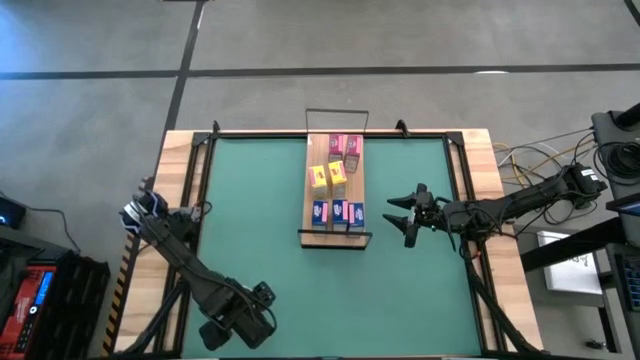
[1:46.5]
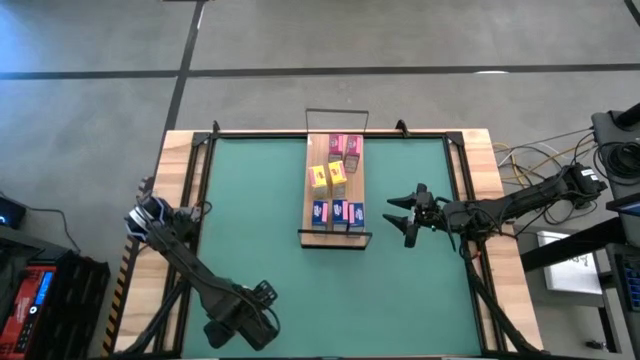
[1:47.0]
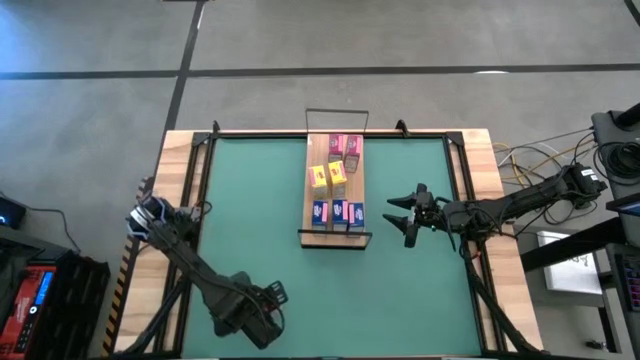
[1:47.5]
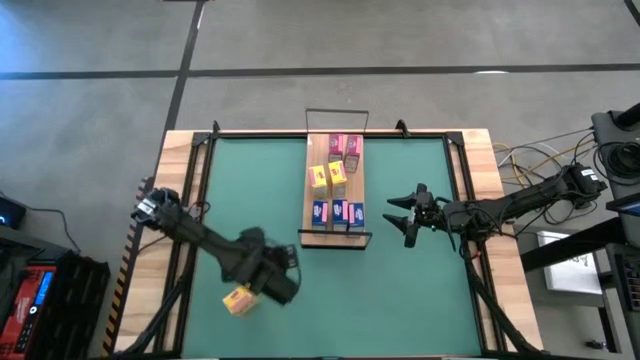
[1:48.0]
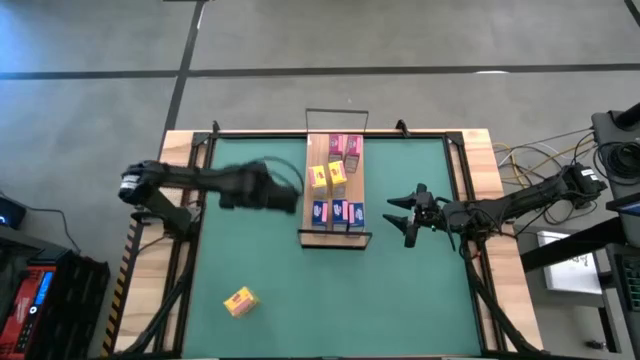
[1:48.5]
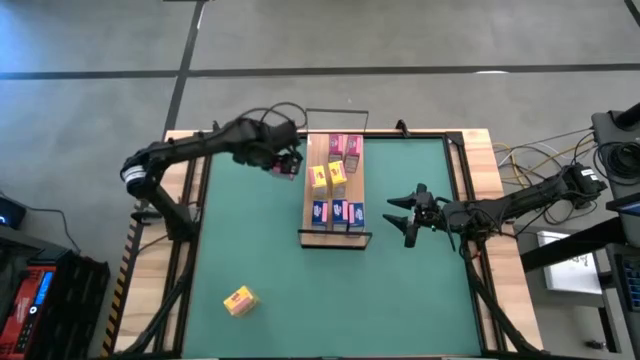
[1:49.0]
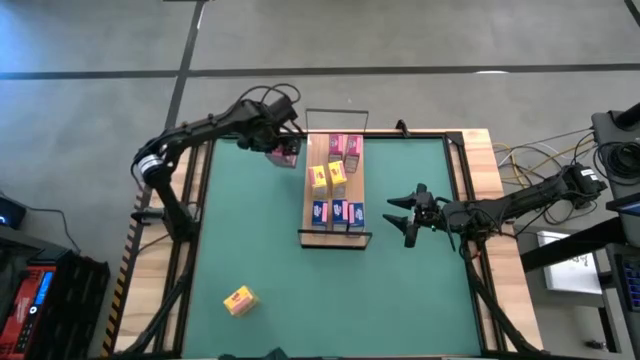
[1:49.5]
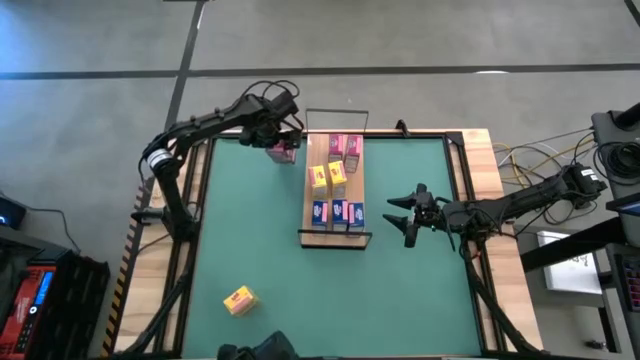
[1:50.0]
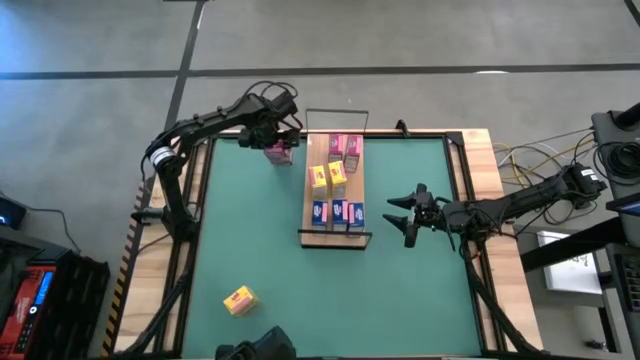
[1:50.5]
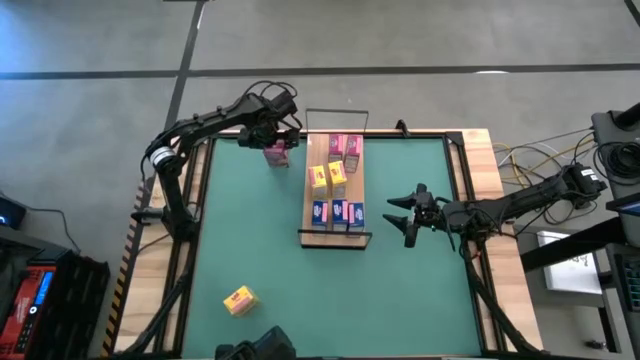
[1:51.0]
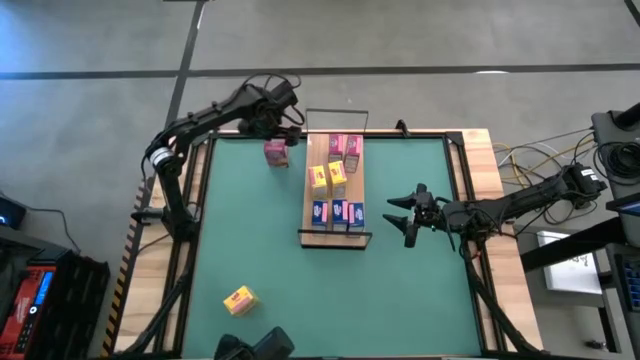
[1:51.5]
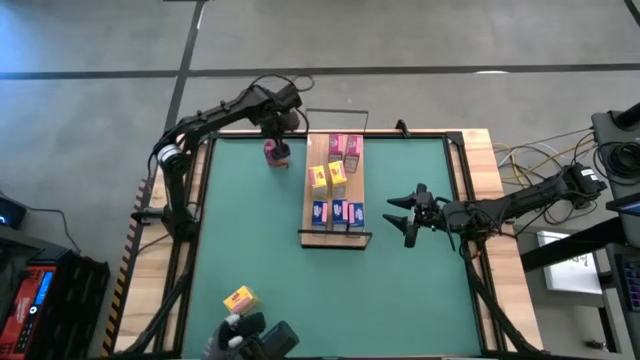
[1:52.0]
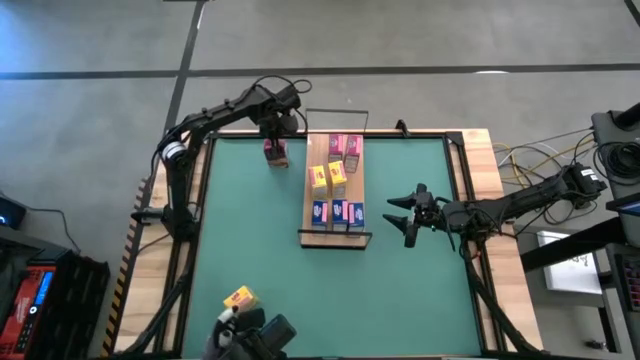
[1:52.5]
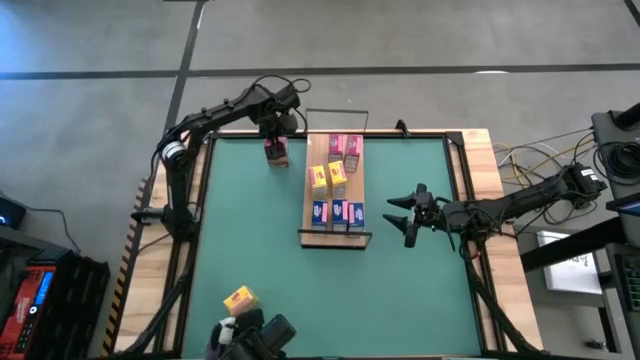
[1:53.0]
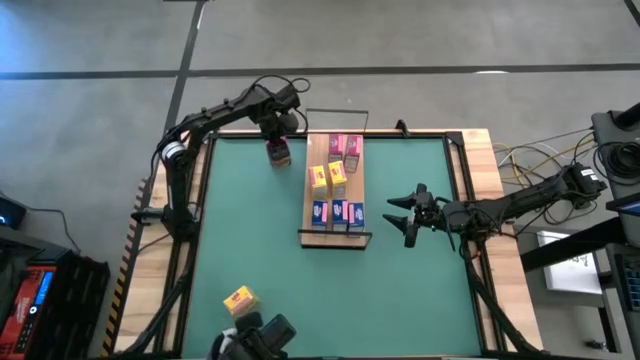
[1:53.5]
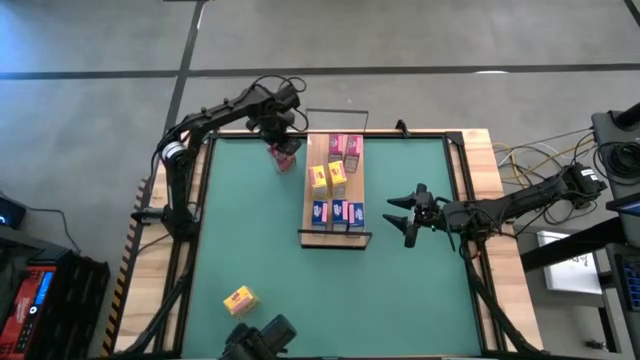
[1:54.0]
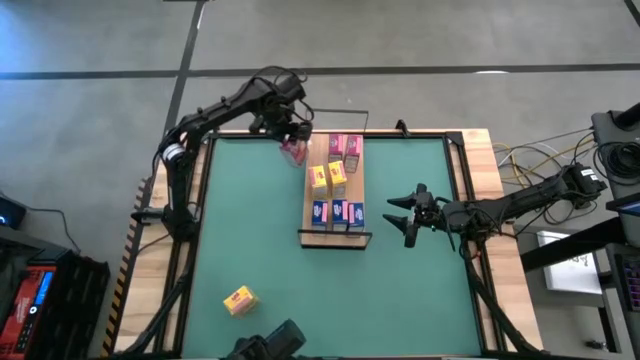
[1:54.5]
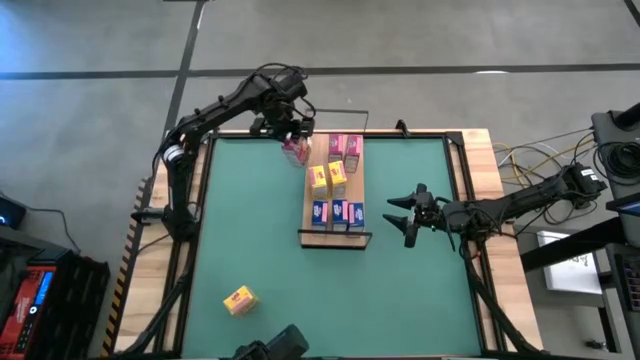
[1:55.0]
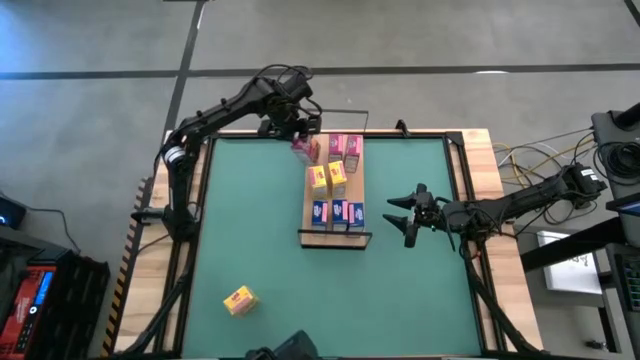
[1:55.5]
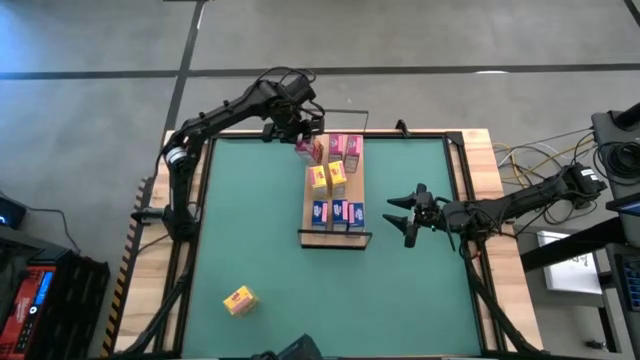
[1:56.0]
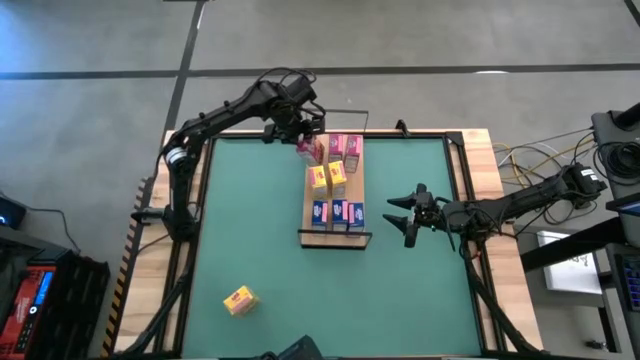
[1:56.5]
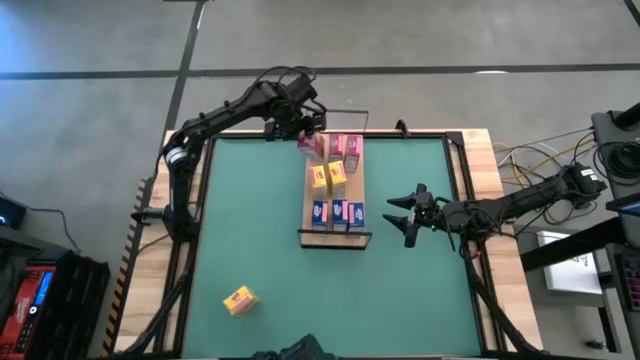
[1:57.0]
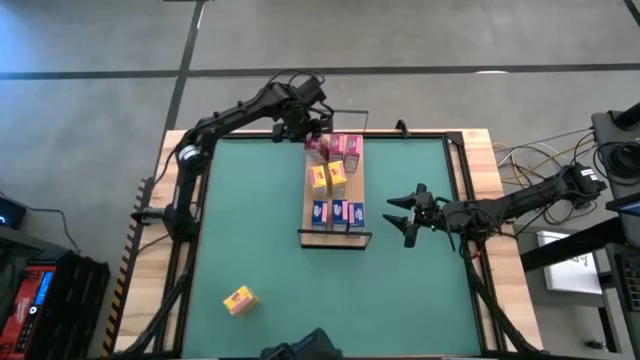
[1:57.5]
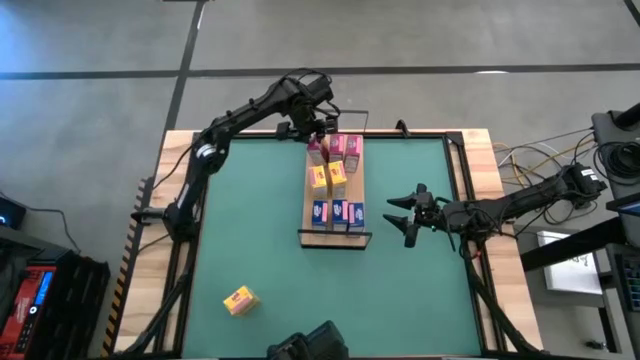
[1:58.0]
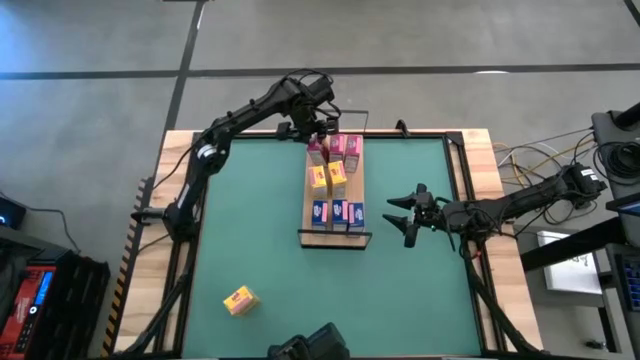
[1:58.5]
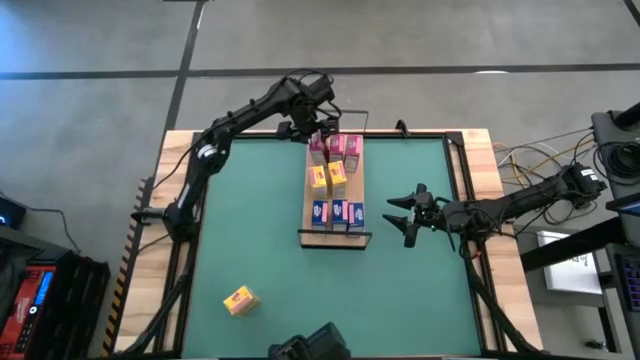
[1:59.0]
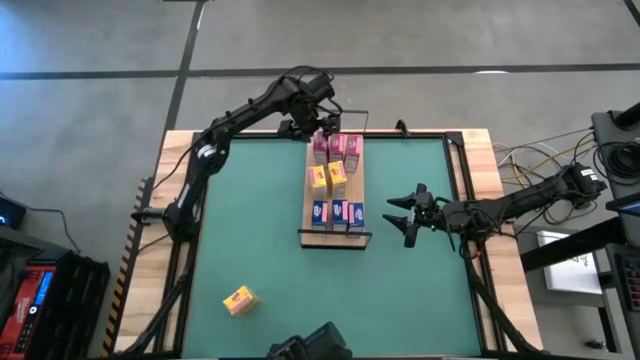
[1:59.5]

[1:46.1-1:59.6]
Task: Stack cereal on shelf
Put the pink cereal box on the shelf

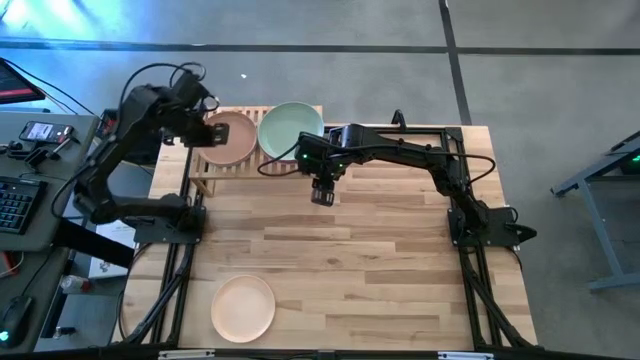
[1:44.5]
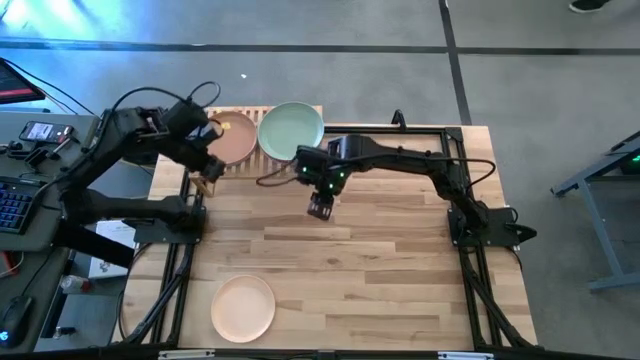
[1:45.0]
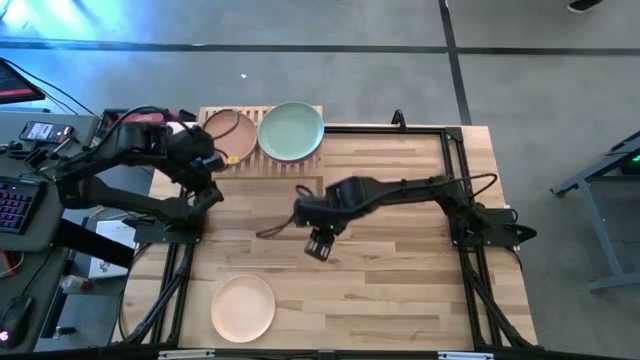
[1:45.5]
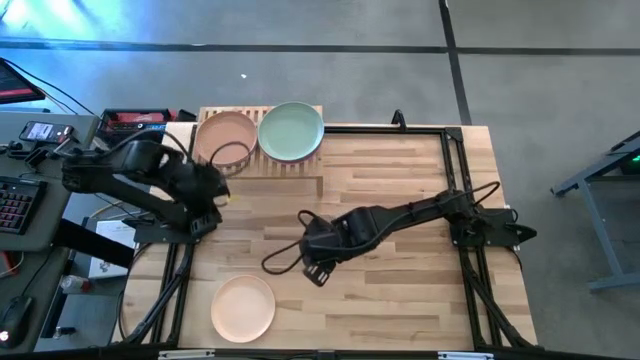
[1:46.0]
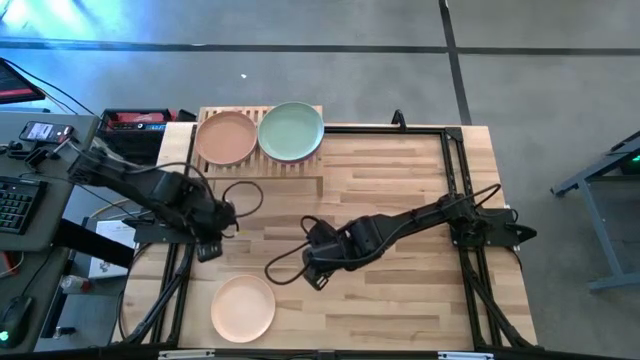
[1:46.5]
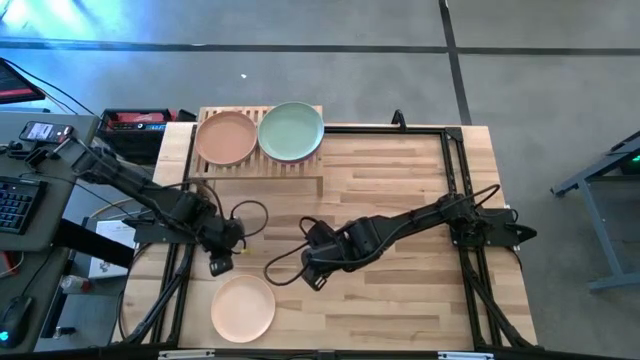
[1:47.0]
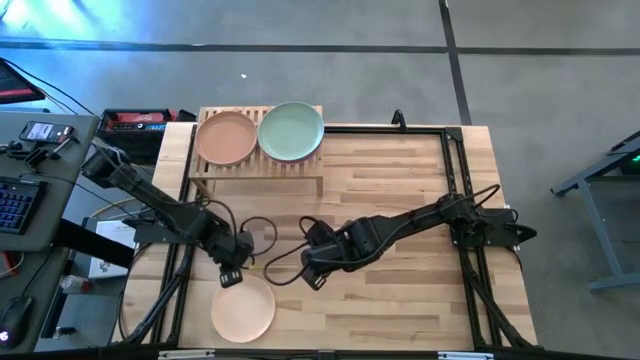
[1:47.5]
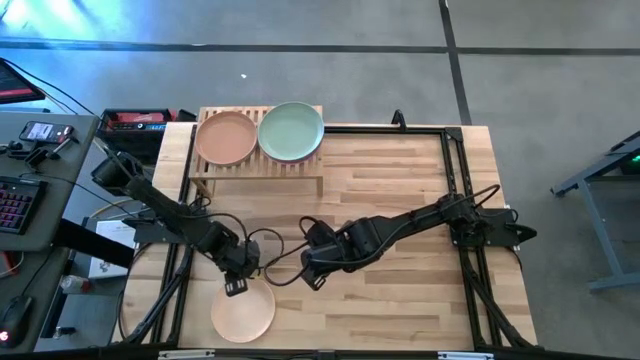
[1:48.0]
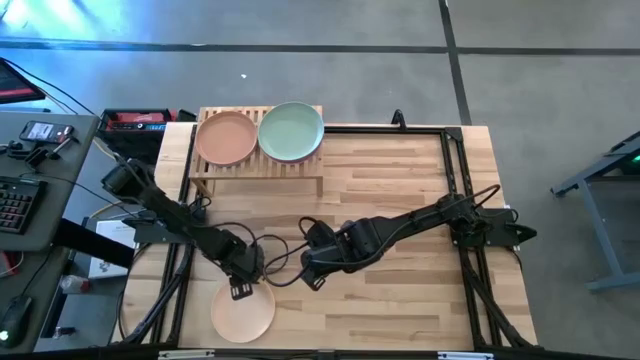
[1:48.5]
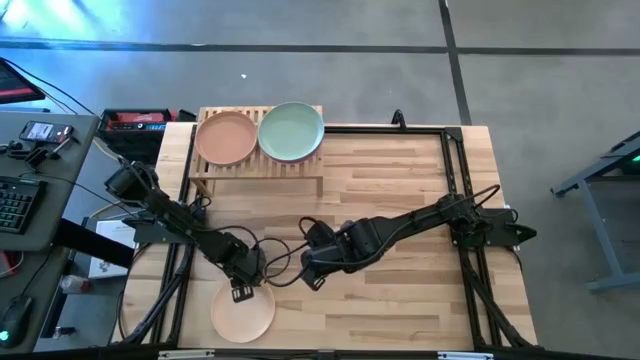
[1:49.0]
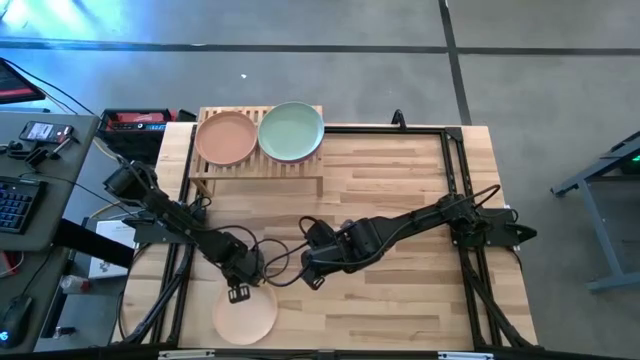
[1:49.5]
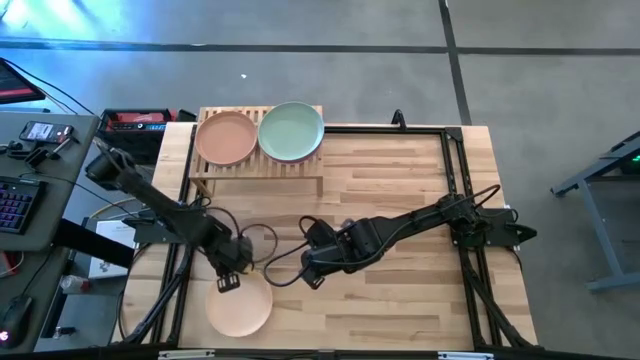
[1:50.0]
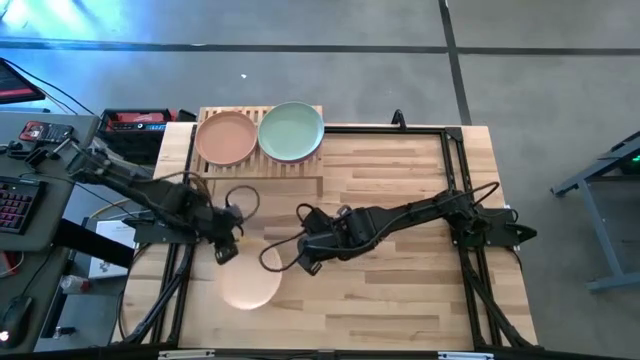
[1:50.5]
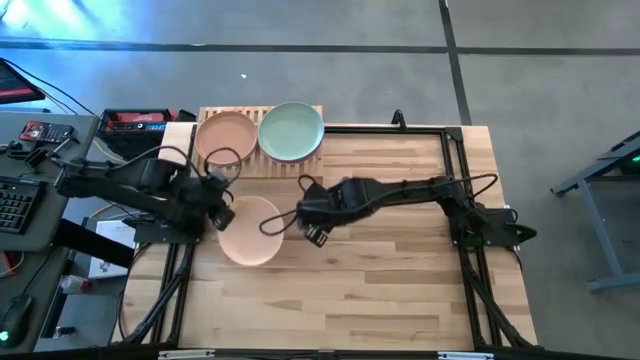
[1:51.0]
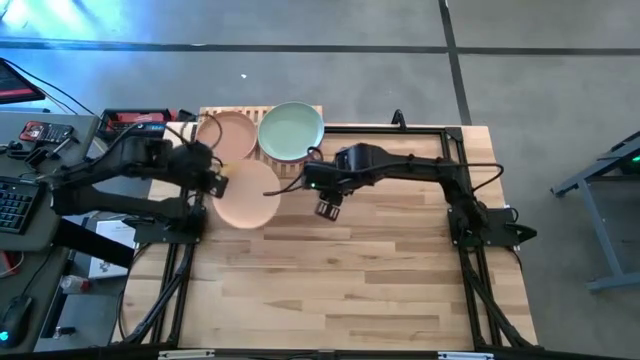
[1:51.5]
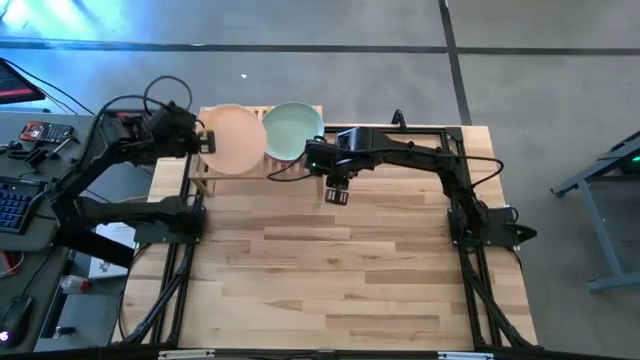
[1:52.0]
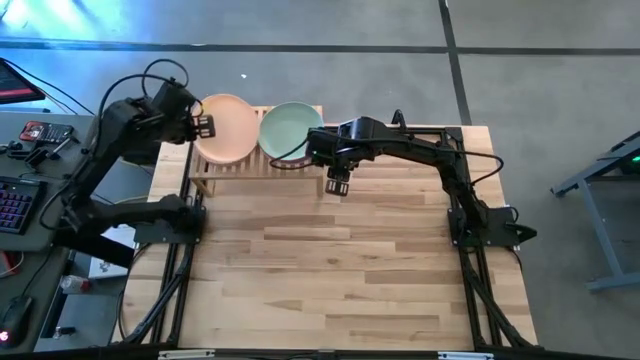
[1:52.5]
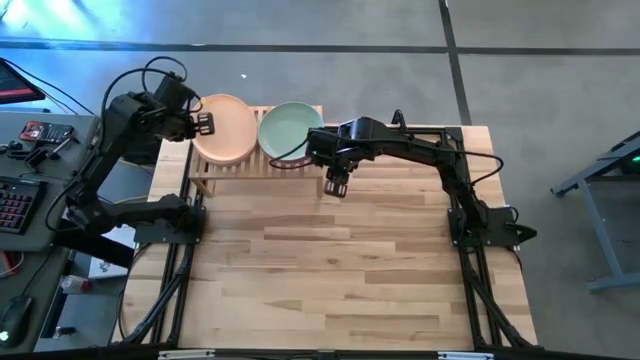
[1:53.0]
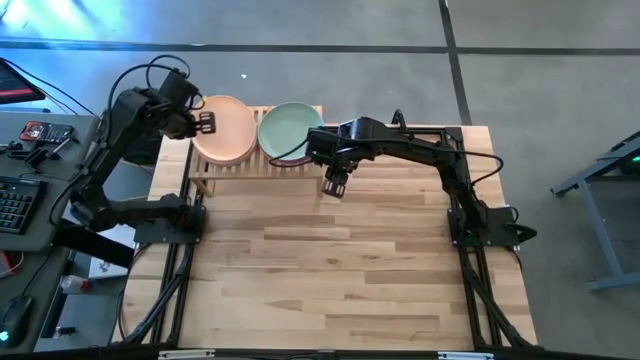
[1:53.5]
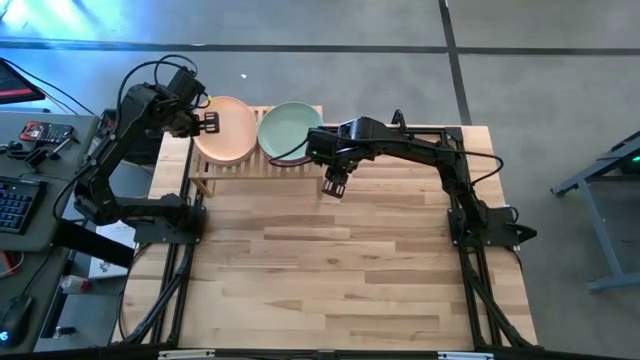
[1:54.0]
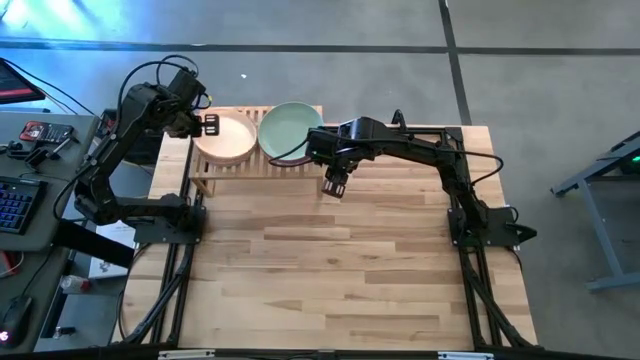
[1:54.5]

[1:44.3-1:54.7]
Task: Place and stack plates onto a shelf
Stack the light orange plate on top of the brown plate on the shelf
